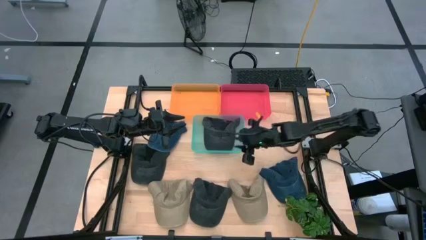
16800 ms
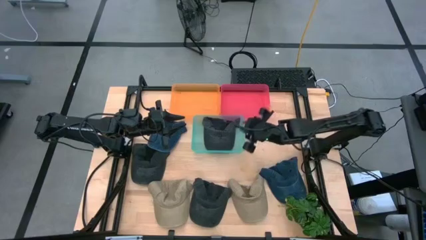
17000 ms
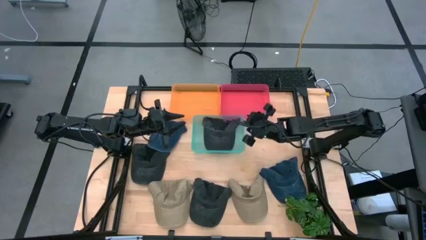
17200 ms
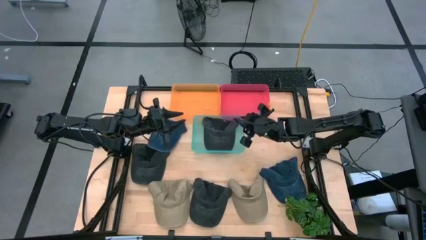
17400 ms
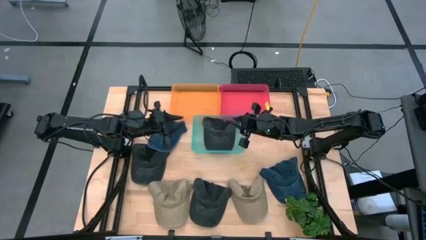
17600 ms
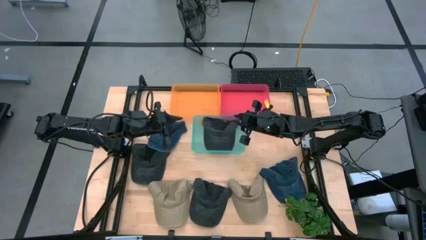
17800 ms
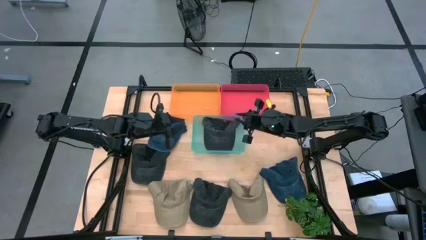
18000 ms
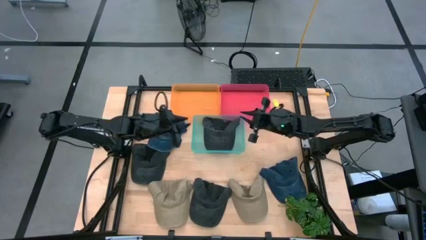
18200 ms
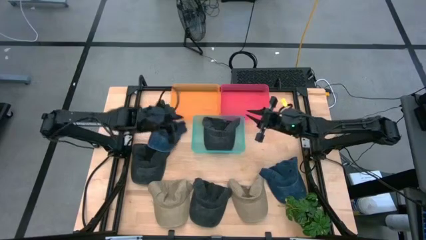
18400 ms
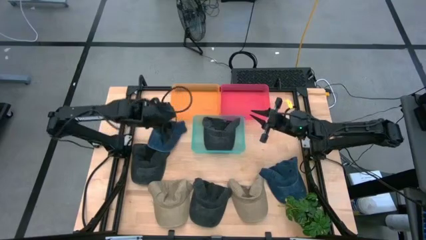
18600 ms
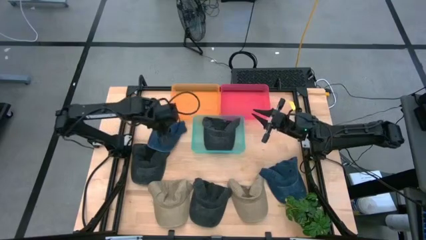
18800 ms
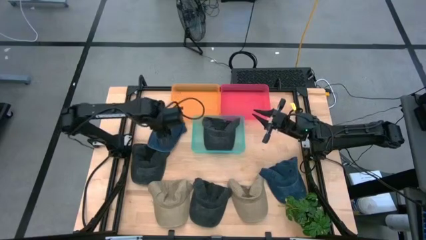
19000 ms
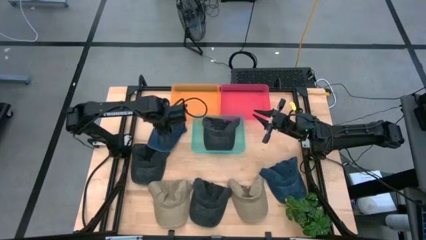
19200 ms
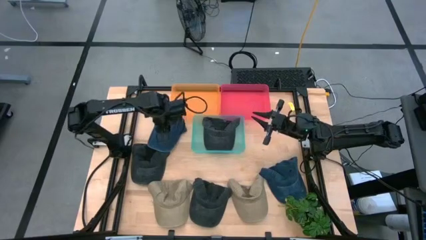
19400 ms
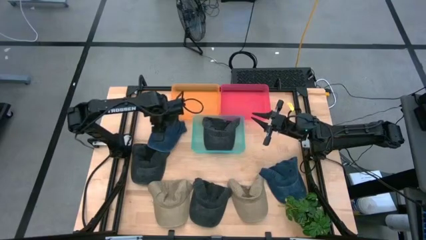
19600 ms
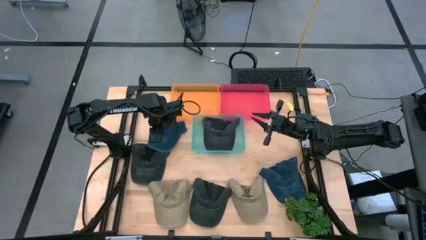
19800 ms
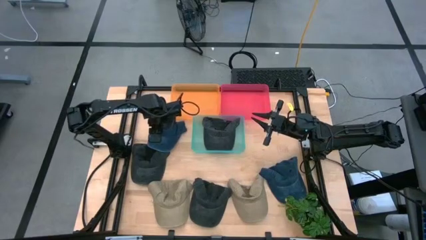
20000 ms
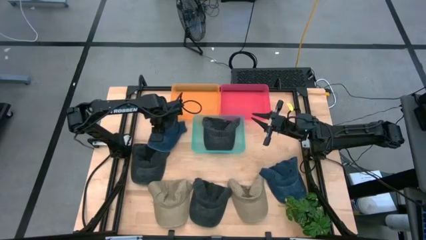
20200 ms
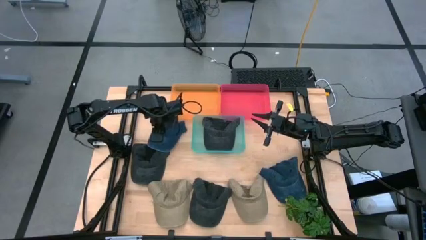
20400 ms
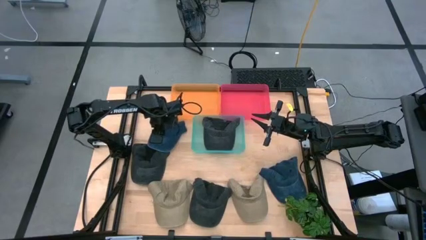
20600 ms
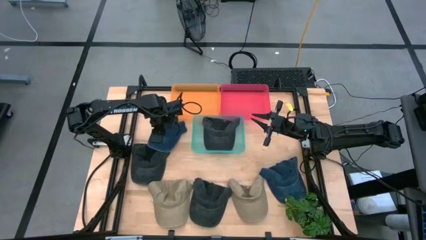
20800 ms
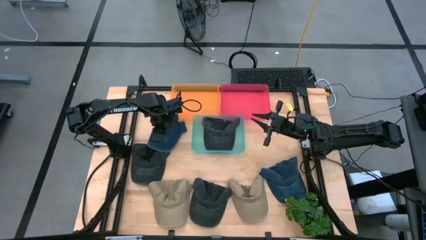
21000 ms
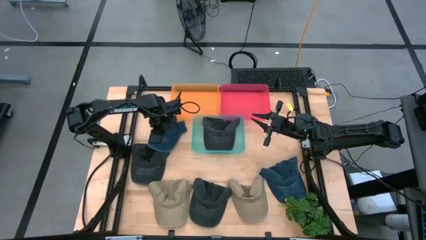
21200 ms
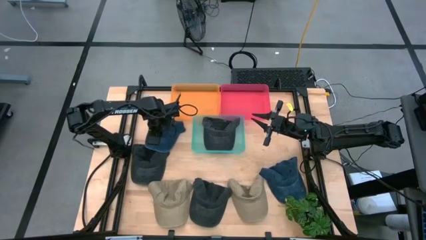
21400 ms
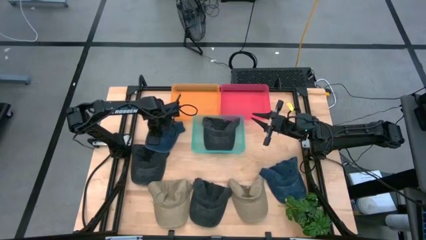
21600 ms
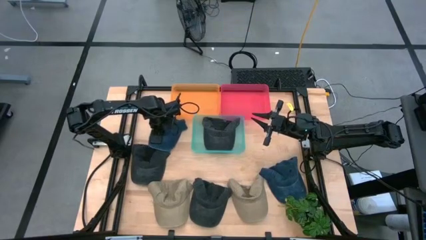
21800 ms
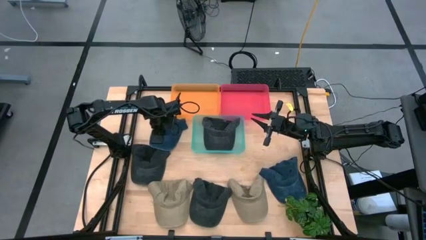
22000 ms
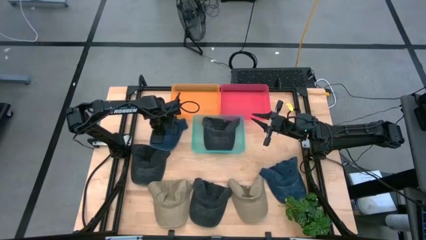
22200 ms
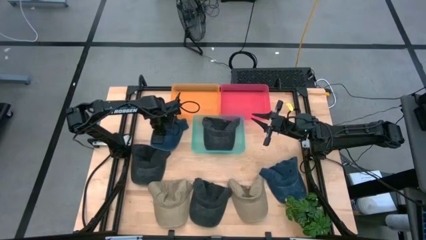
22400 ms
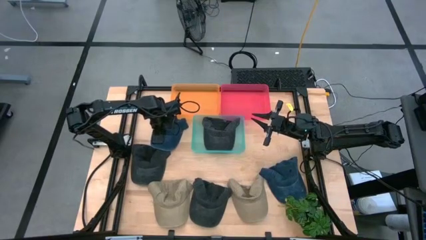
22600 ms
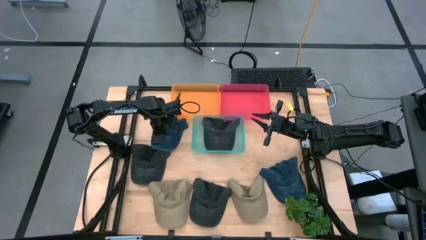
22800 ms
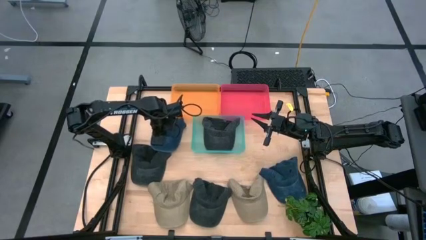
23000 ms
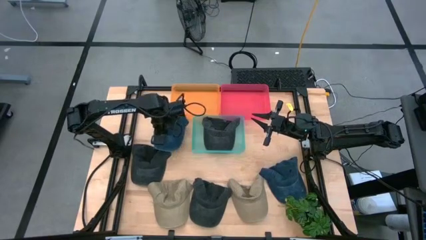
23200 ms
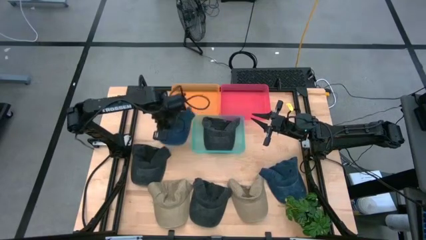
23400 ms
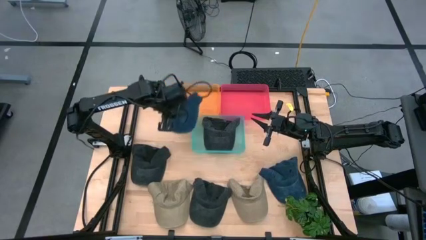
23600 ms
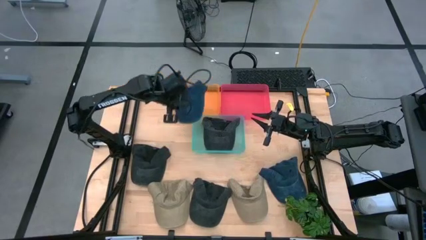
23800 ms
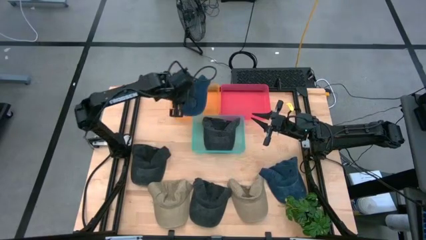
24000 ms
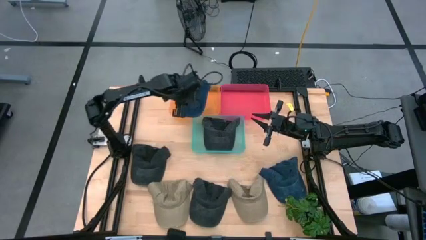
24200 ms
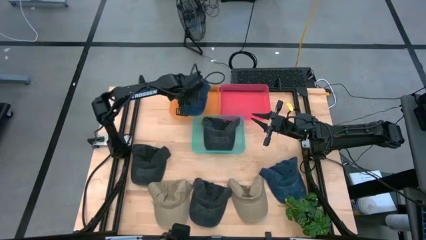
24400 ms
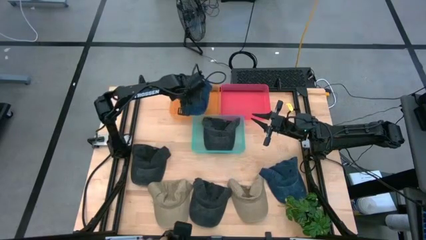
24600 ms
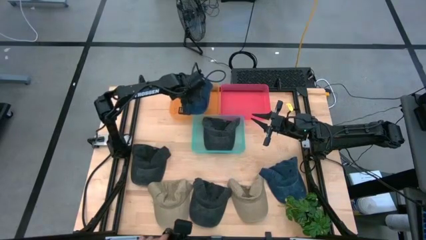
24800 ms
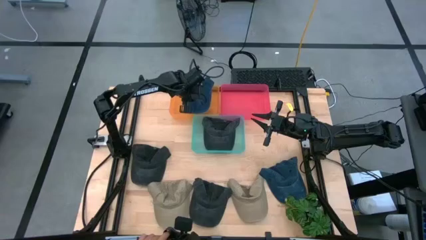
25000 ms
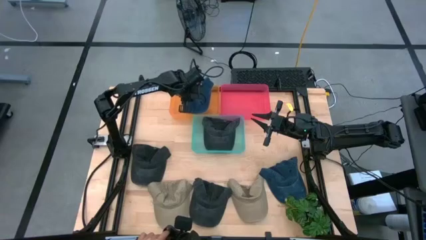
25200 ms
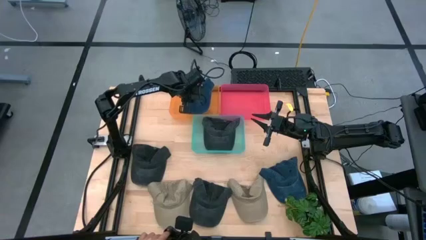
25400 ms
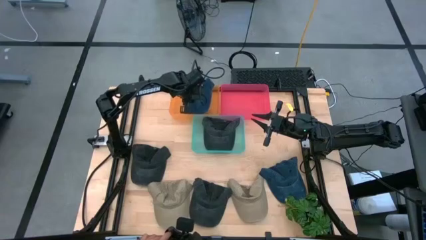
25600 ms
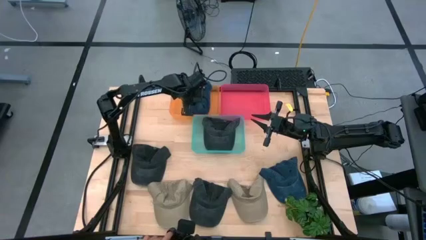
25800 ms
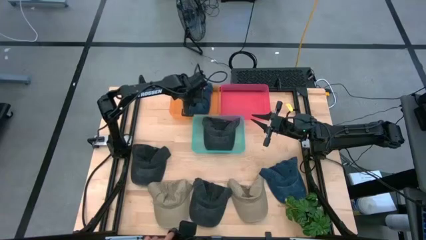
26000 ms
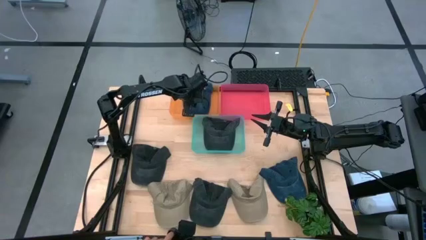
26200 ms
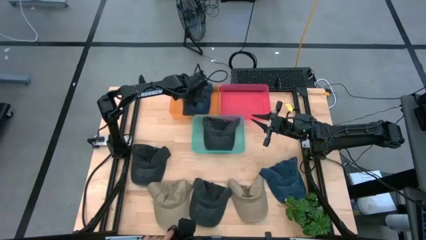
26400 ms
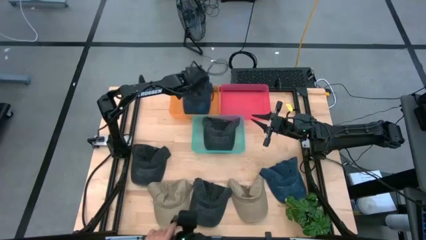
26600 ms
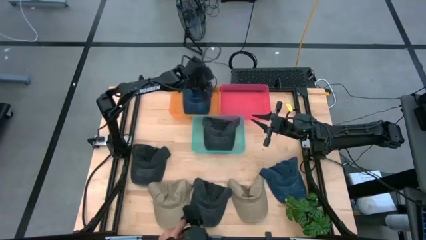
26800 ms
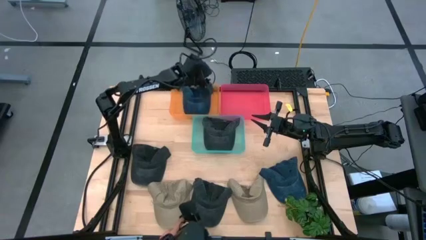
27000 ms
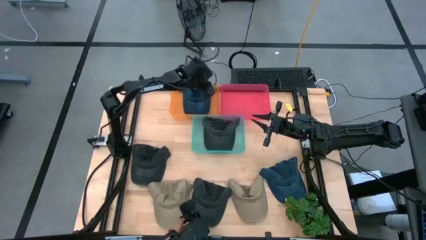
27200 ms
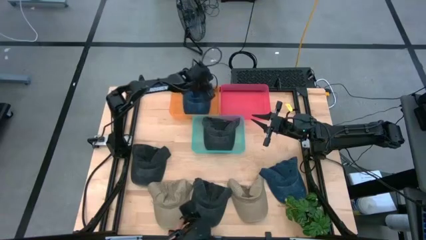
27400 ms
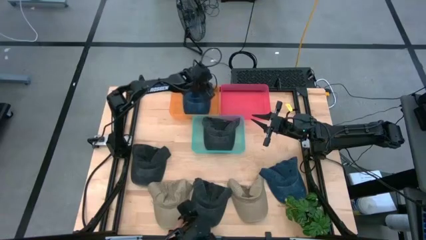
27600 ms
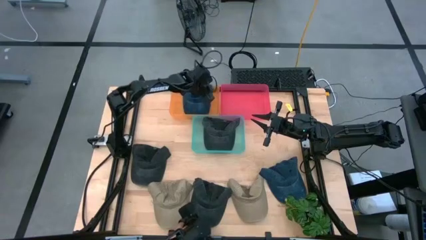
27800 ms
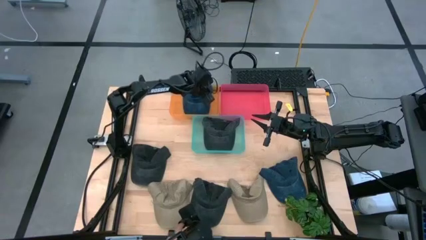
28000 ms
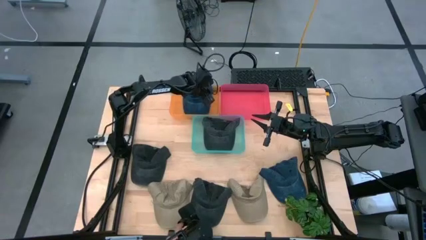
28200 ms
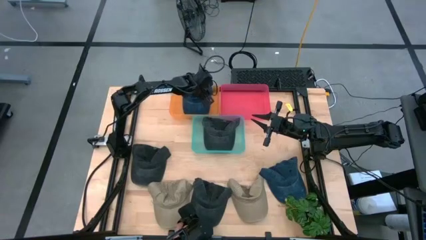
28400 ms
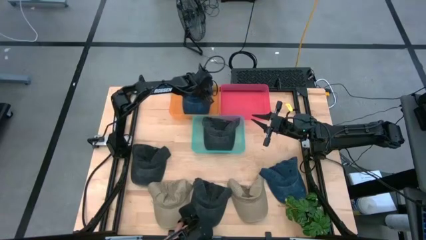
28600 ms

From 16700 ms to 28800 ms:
Task: Pick & Place hat
Put the top blue cap into the orange bin

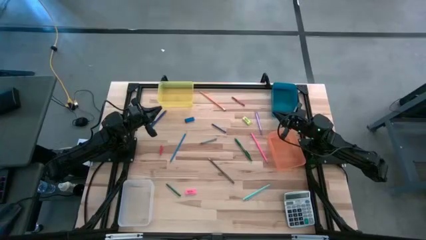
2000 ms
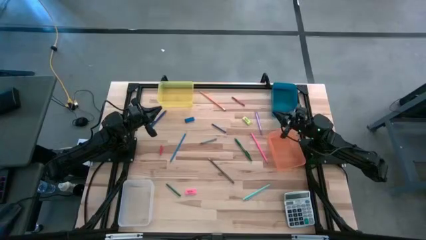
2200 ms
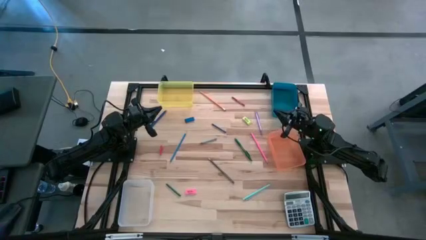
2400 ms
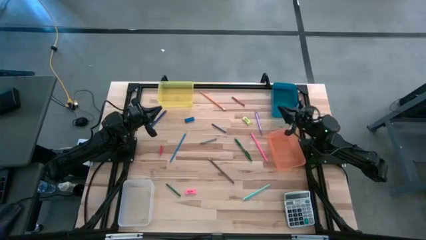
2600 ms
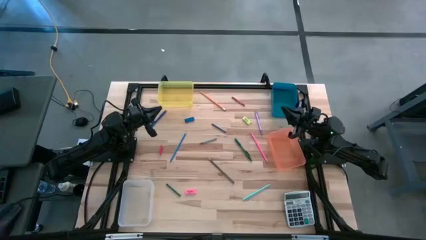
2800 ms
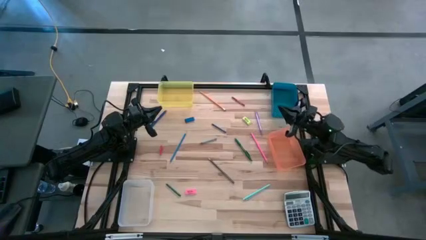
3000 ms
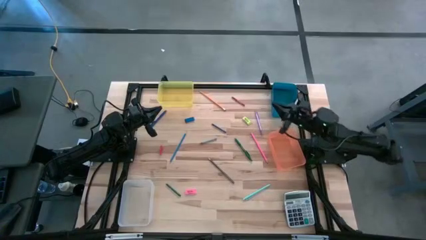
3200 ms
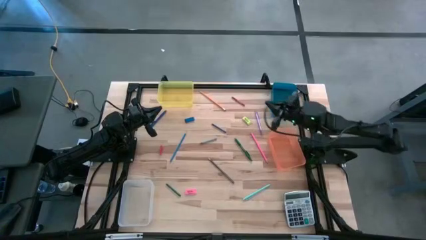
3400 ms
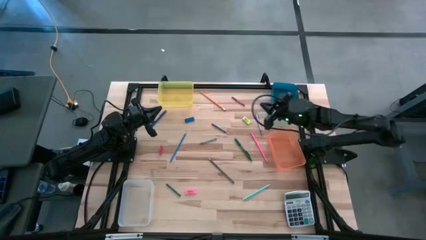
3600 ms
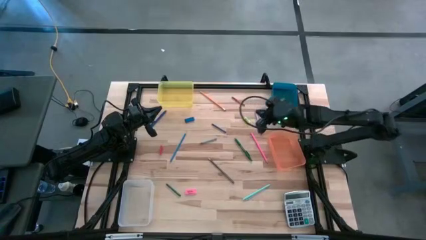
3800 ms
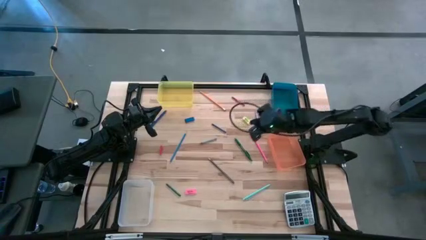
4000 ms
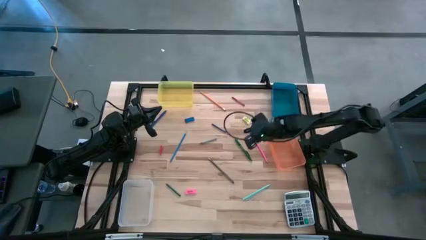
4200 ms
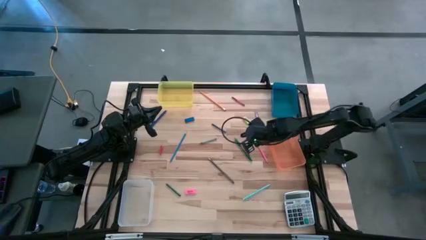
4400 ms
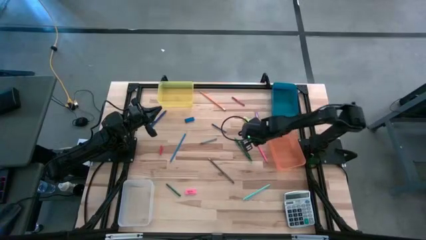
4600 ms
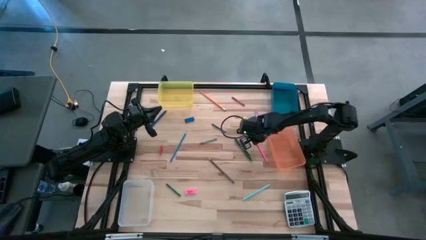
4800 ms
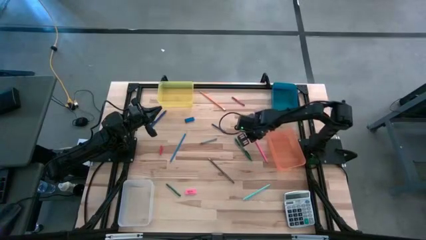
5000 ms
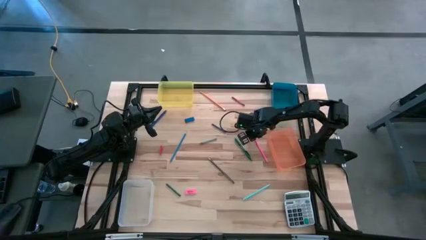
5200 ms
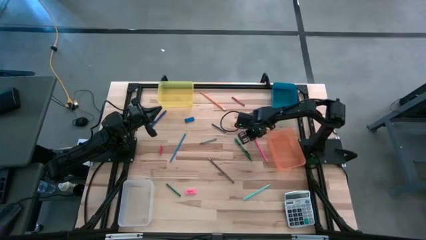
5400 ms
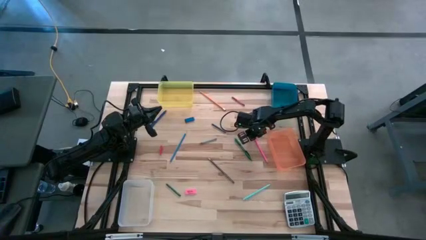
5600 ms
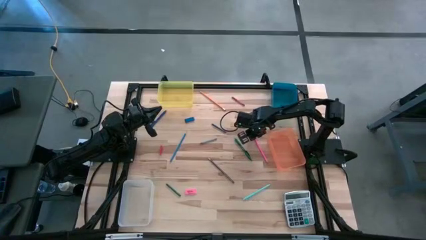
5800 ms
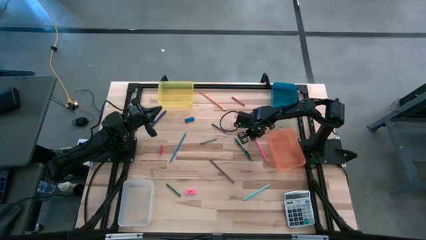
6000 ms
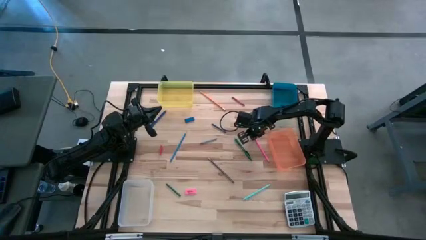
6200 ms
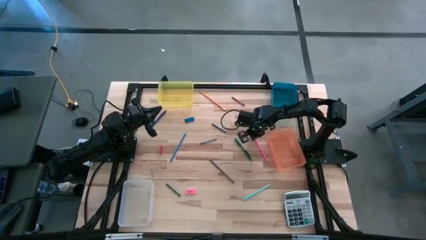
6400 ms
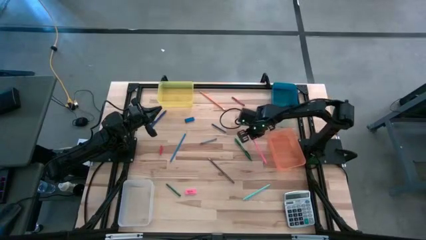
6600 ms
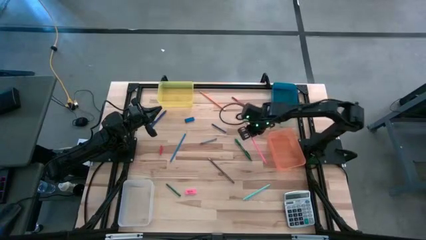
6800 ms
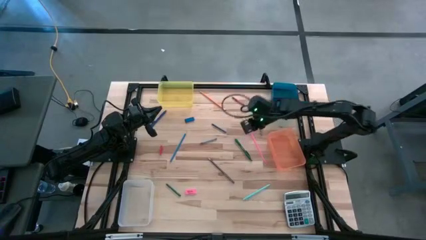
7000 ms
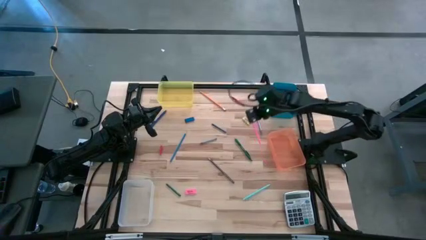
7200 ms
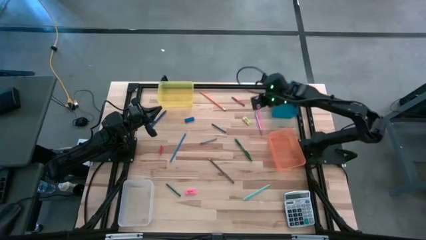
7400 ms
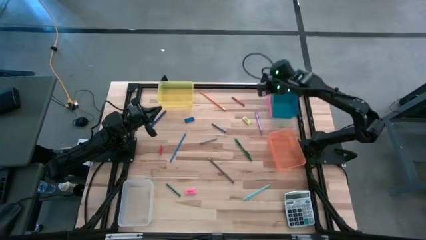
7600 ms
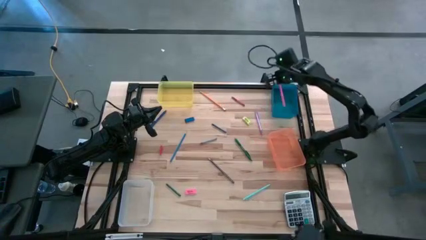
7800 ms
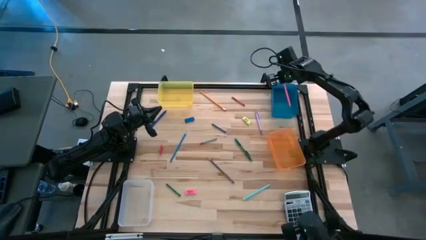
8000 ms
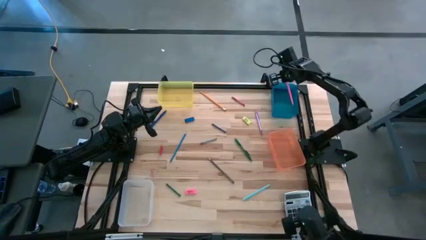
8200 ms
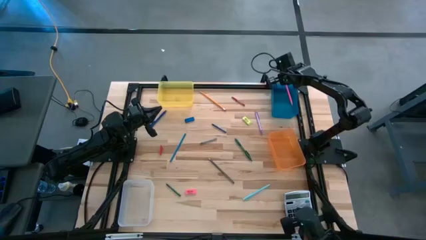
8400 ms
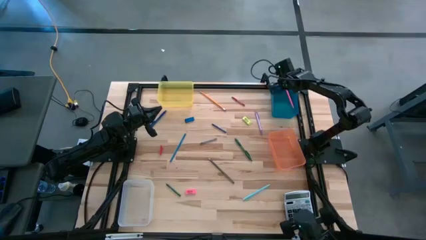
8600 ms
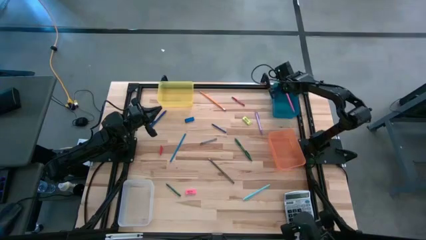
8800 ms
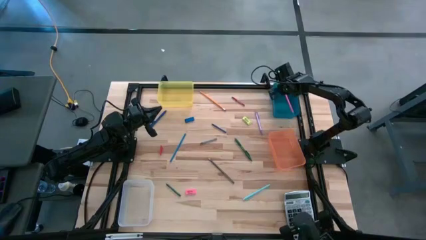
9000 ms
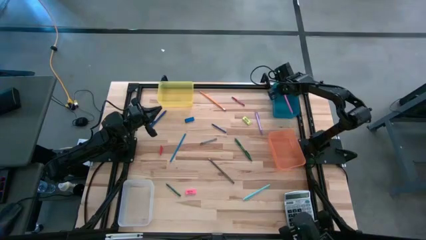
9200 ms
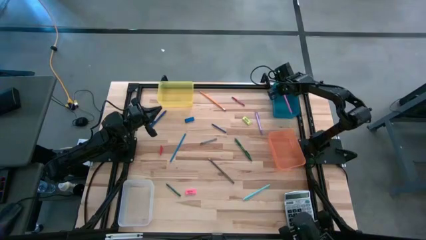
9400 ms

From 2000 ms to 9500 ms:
Task: Sort crayons/erasers/pens/pencils in bins
Put the pink pencil into the blue bin
